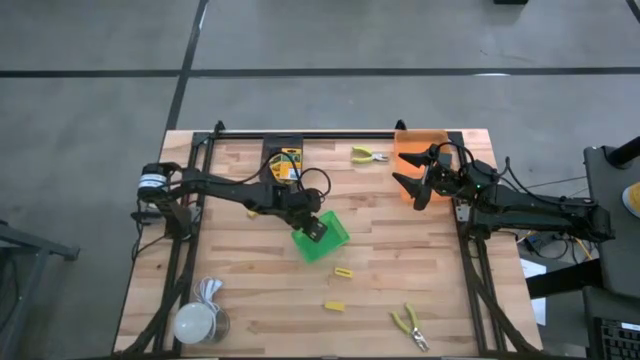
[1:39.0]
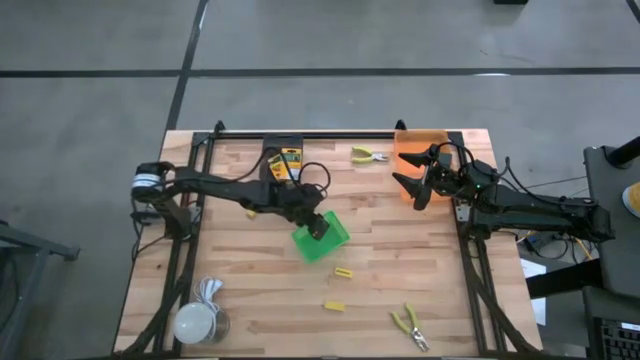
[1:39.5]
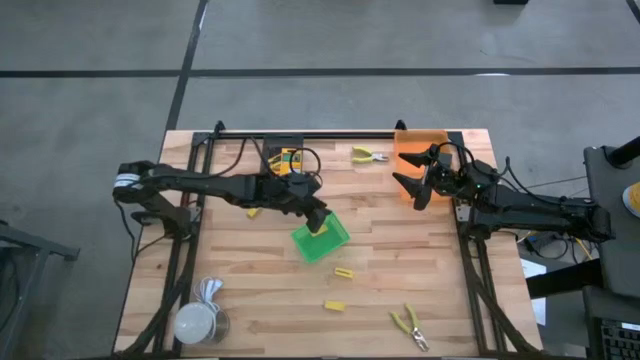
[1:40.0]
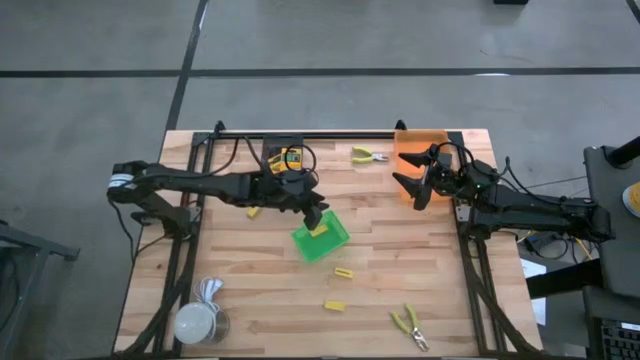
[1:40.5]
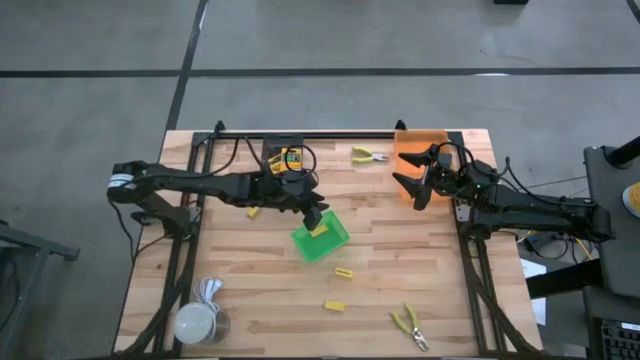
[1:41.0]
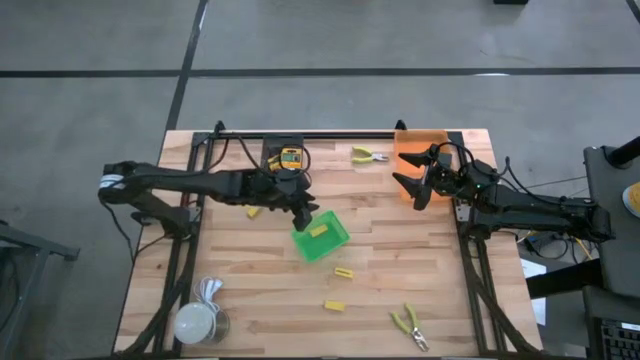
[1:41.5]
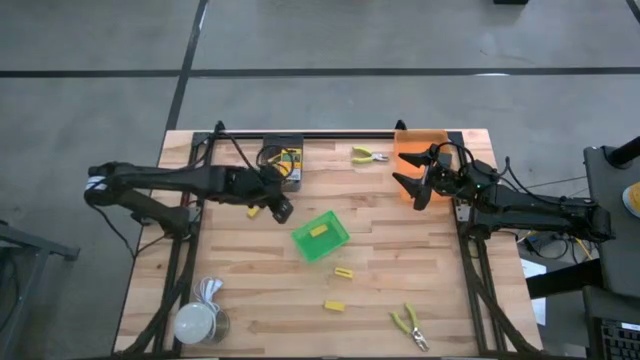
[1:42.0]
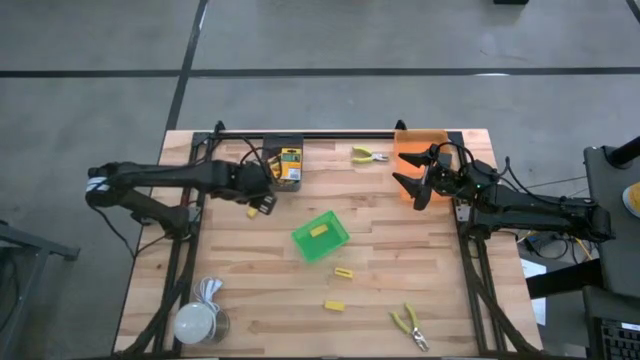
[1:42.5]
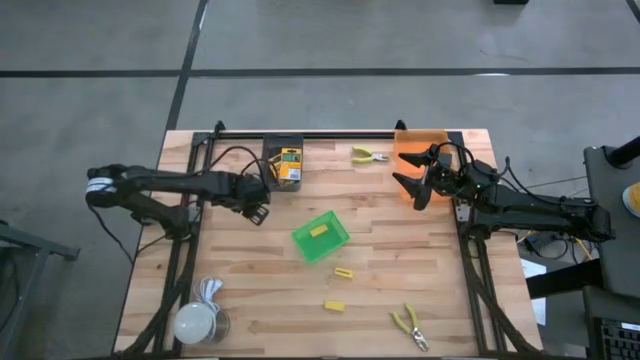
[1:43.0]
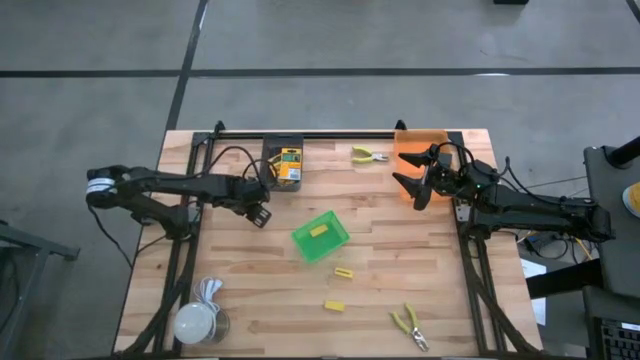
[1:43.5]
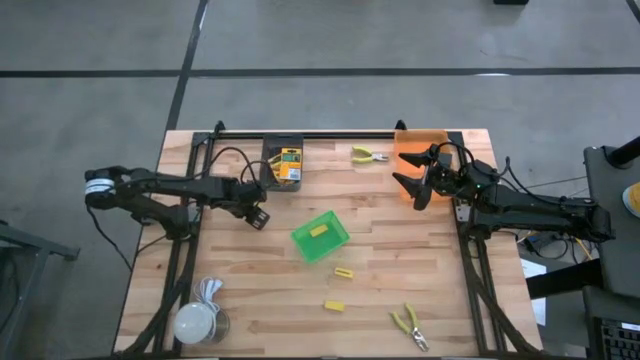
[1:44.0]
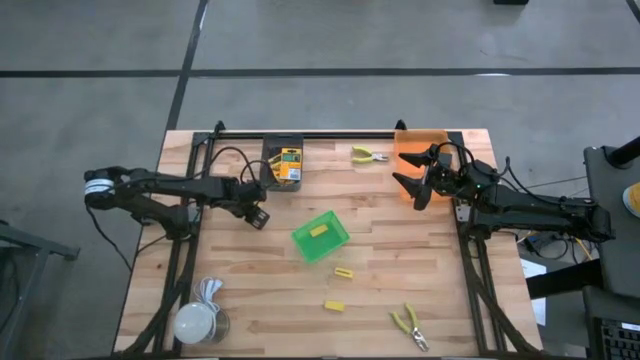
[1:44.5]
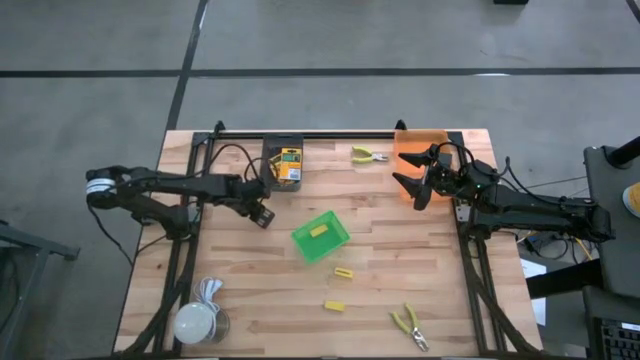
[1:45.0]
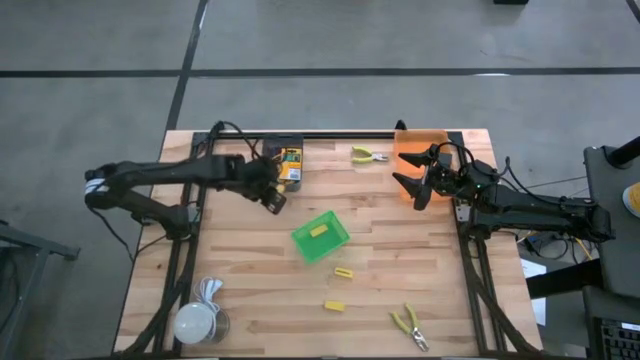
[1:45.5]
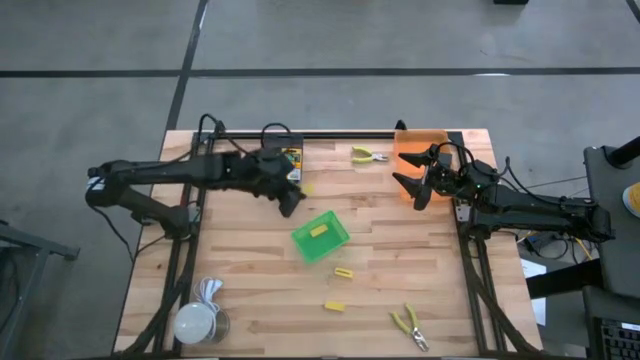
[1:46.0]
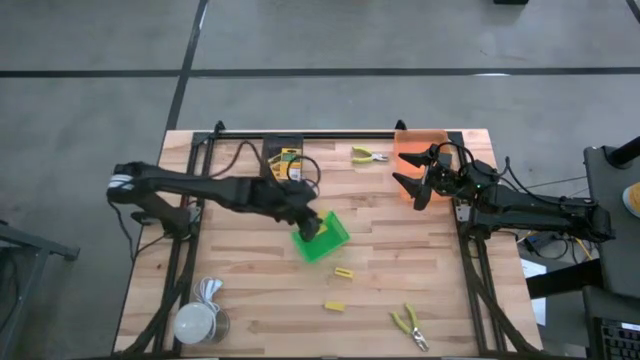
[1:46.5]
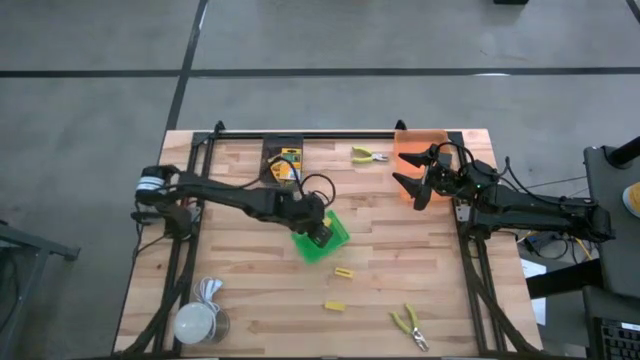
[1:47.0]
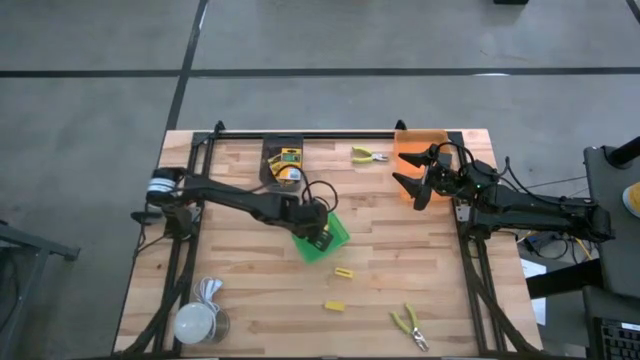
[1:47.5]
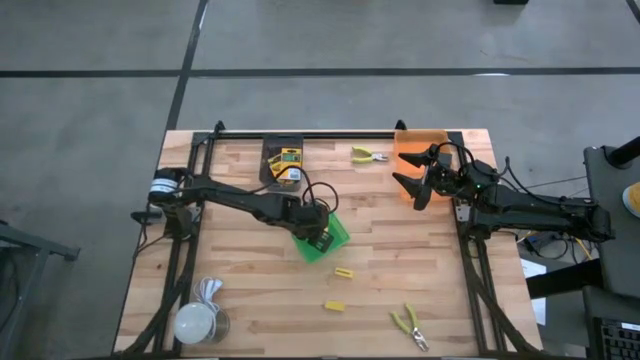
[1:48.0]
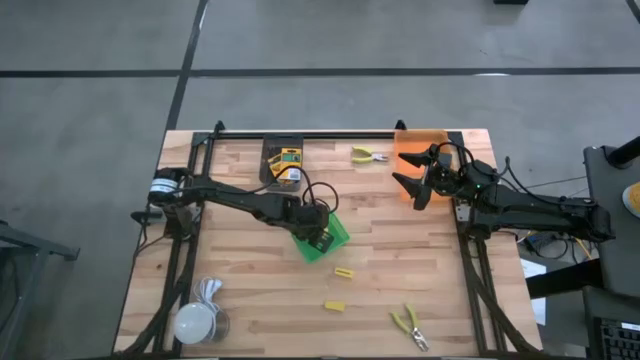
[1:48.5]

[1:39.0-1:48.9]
Task: Pick & Place School Supplies
Put the yellow eraser into the green bin

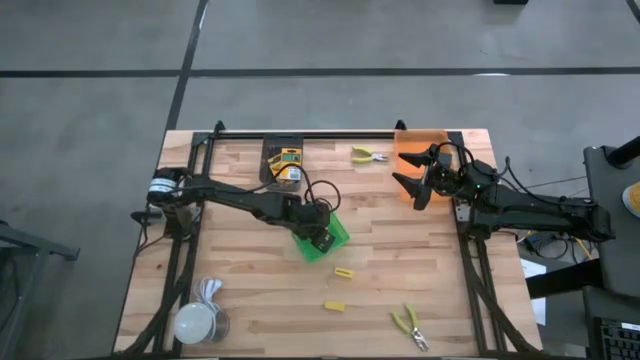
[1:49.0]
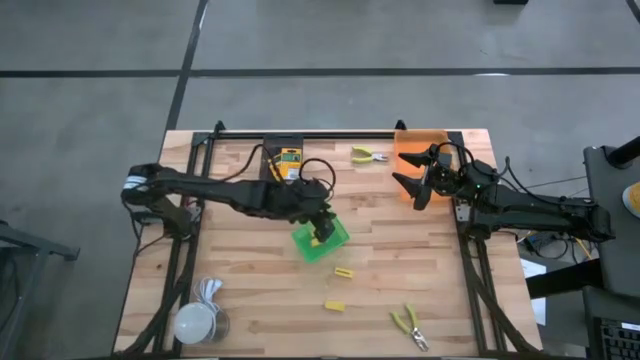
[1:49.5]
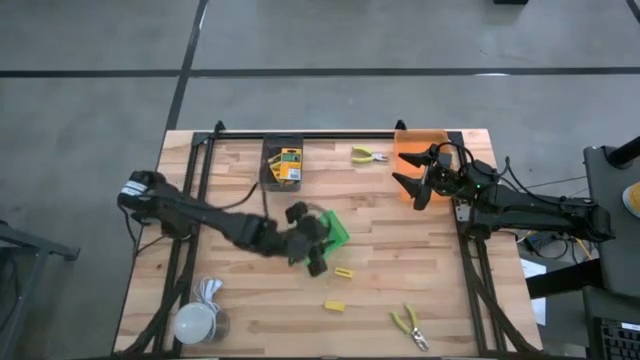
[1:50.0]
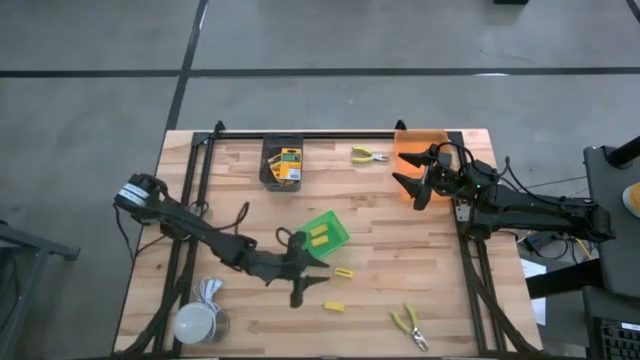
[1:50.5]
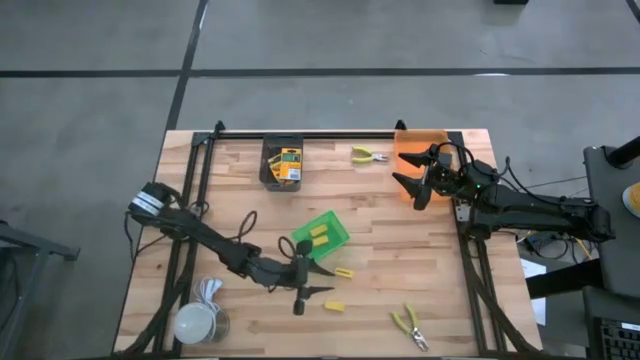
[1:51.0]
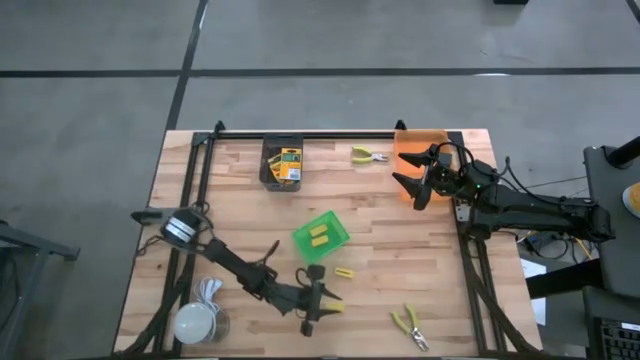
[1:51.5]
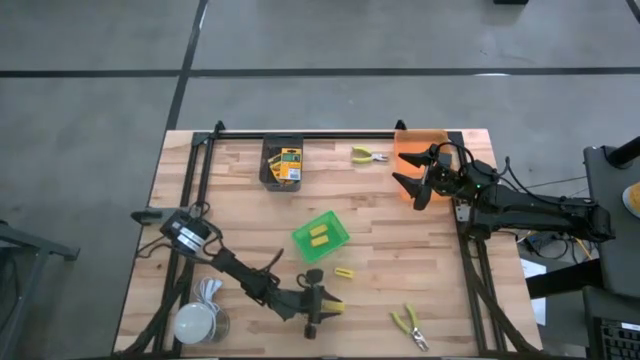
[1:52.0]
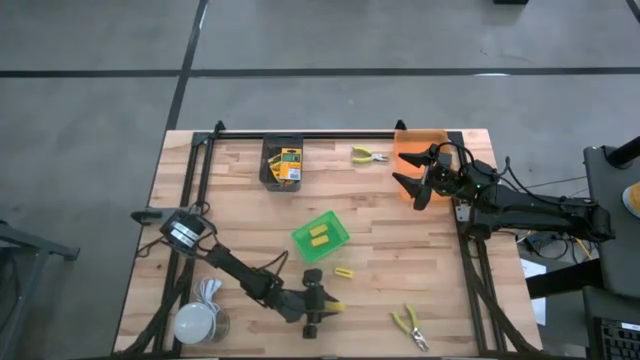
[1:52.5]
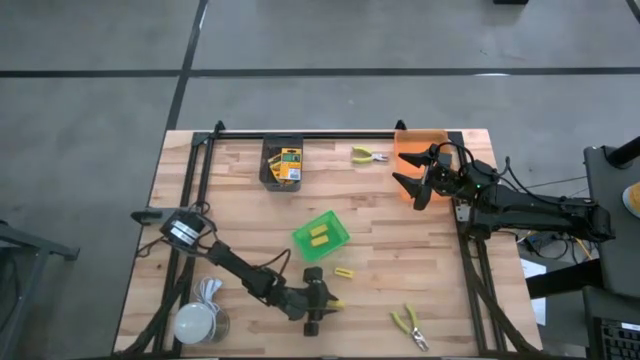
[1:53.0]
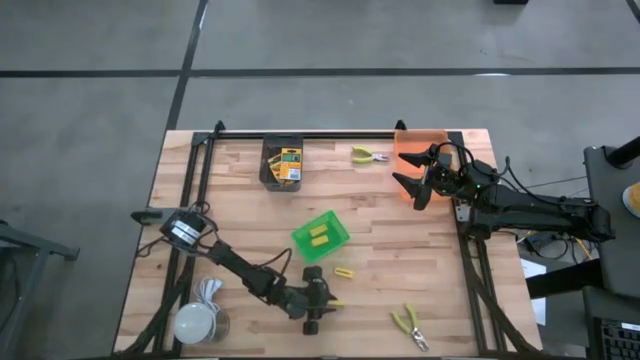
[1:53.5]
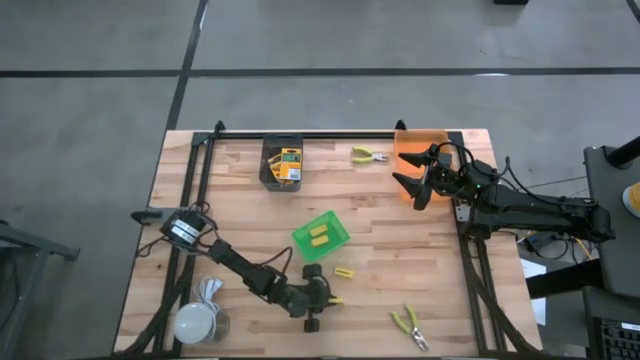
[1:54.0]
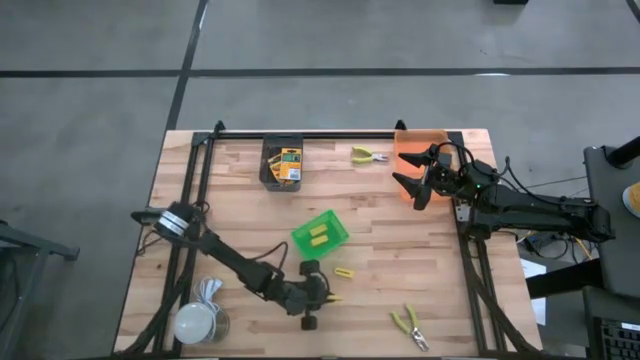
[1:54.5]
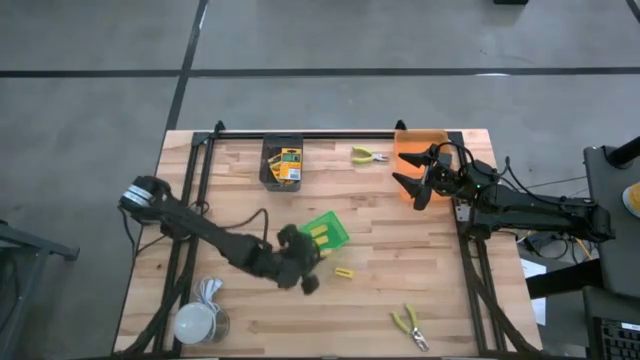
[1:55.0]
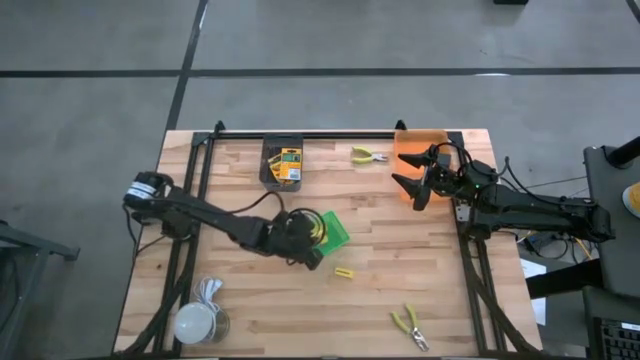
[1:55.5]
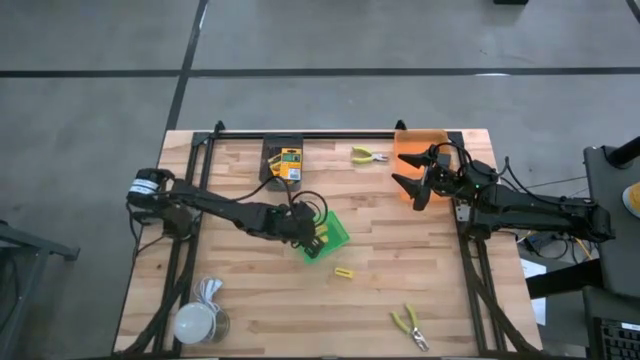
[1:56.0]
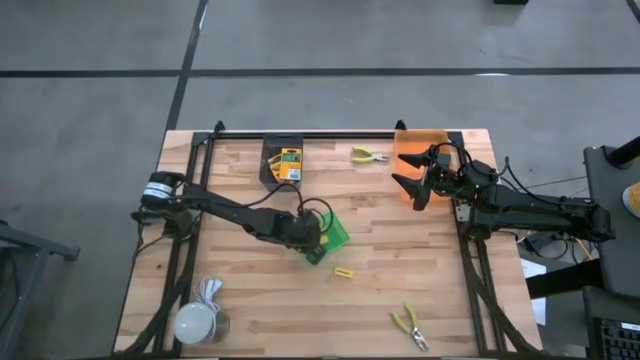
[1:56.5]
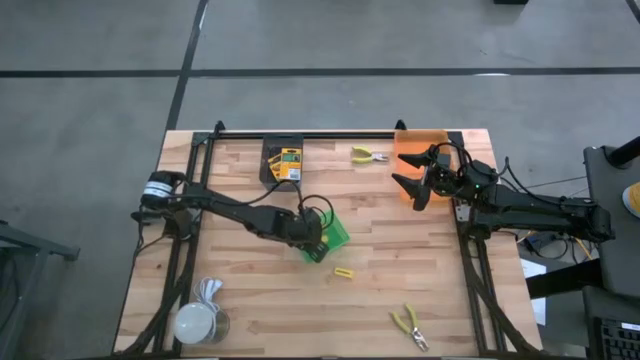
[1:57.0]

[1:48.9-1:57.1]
Put the yellow eraser into the green bin

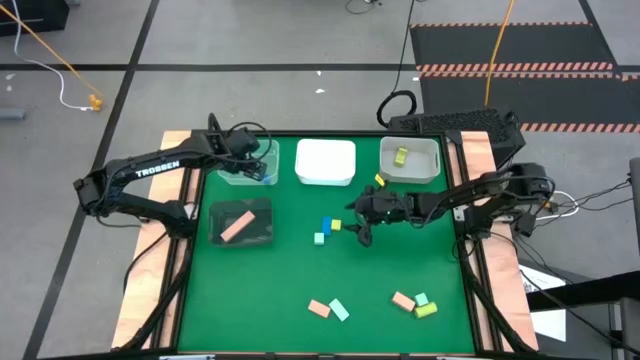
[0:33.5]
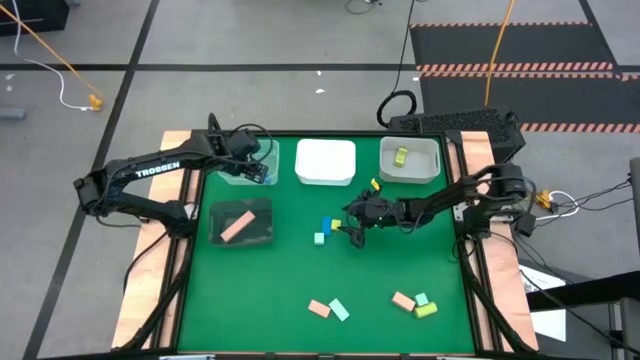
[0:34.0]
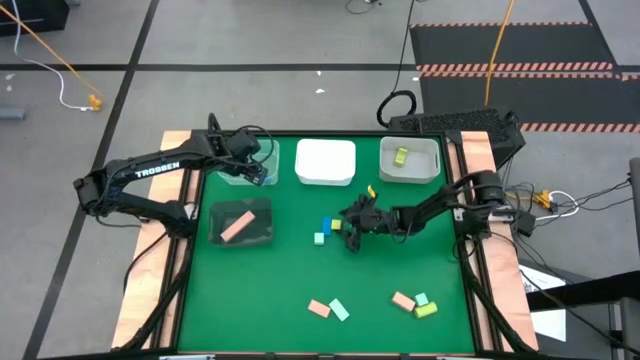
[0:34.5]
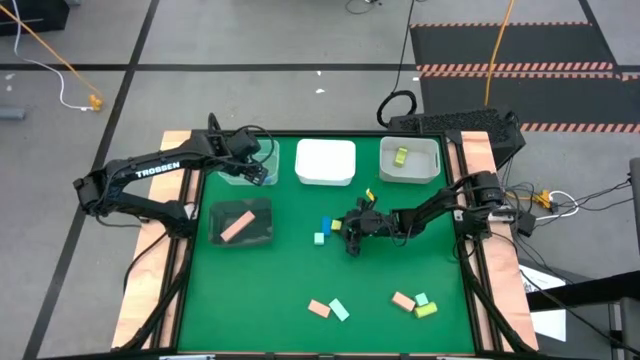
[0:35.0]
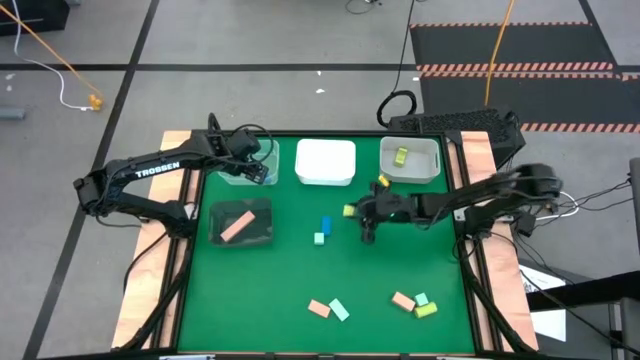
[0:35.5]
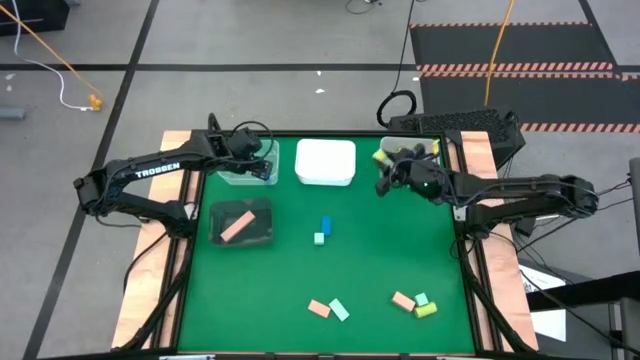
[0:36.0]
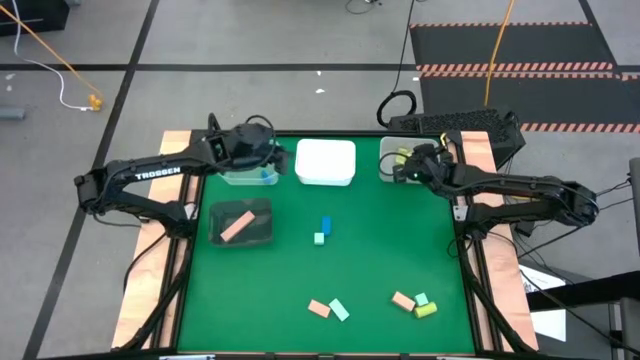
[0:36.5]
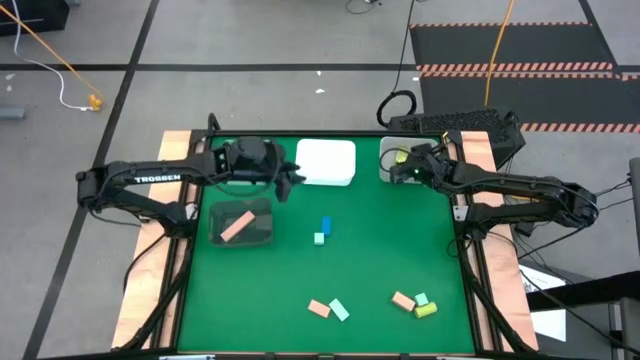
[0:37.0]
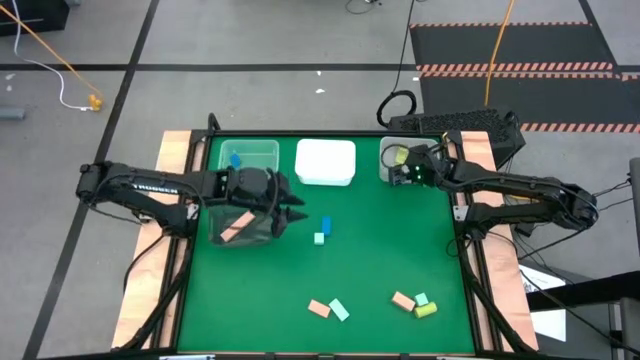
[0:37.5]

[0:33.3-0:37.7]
Task: Sort & place blocks by color
Put the light green block into the gray bin
